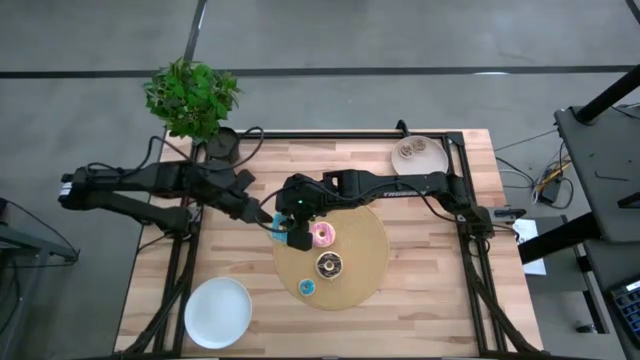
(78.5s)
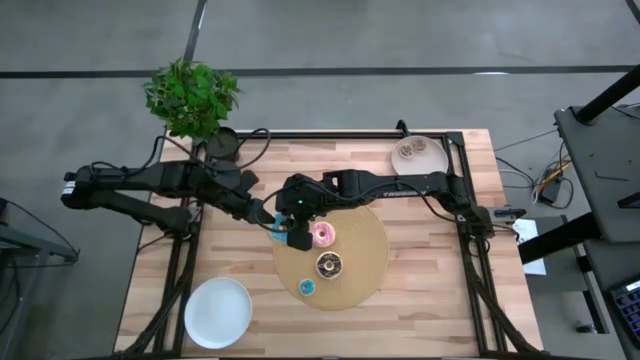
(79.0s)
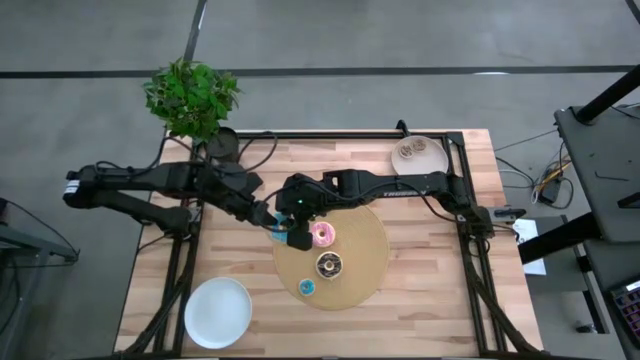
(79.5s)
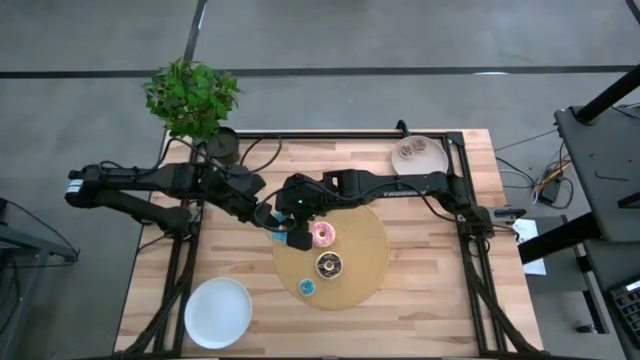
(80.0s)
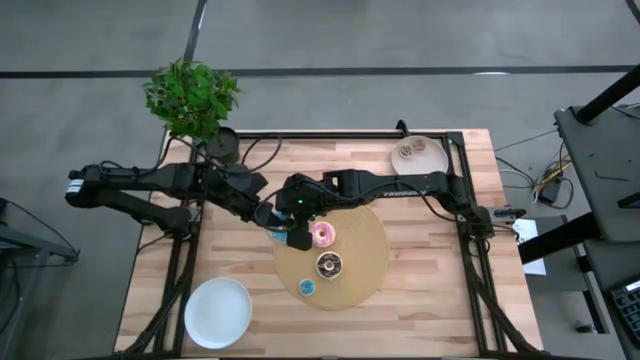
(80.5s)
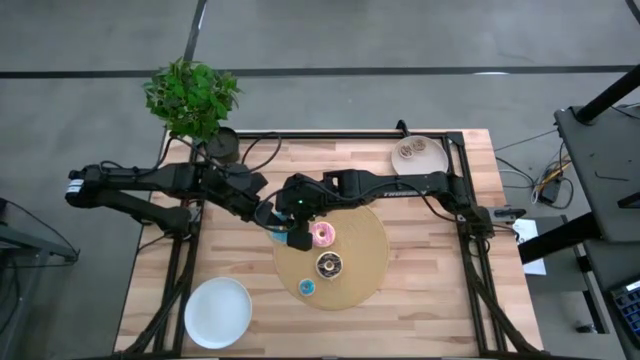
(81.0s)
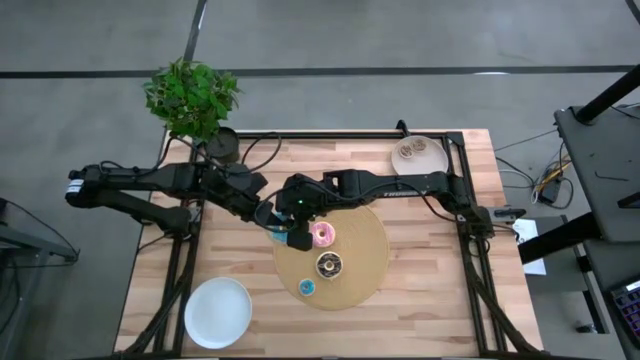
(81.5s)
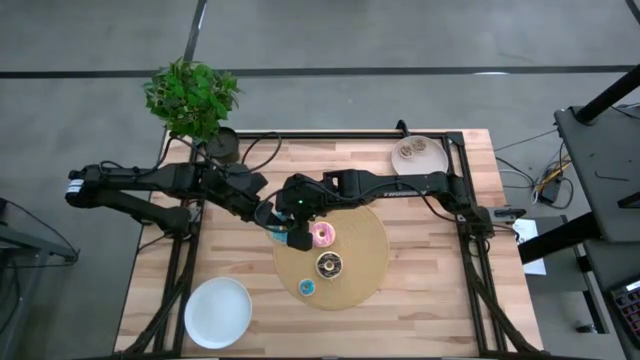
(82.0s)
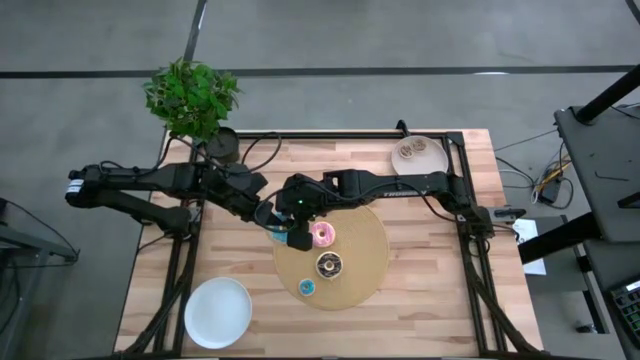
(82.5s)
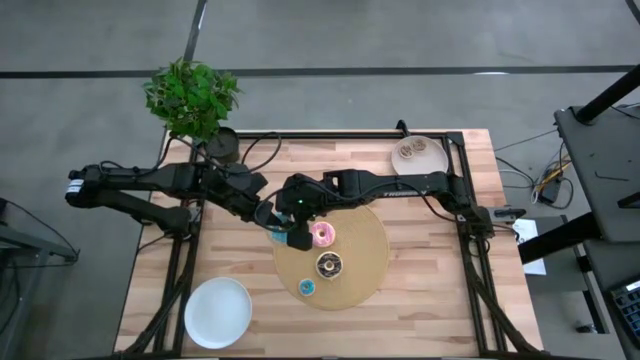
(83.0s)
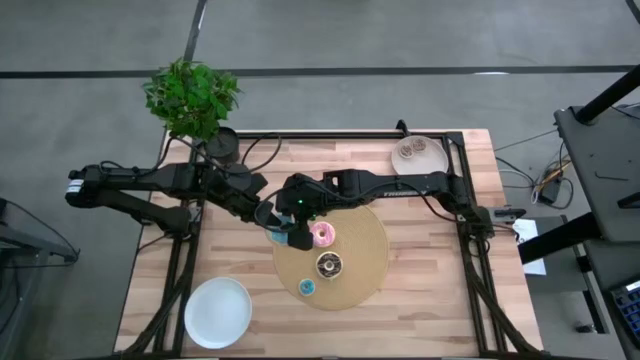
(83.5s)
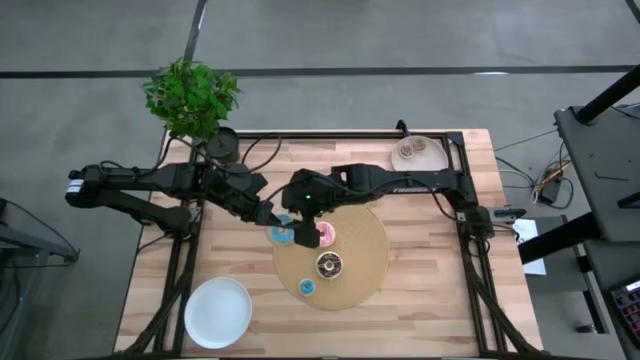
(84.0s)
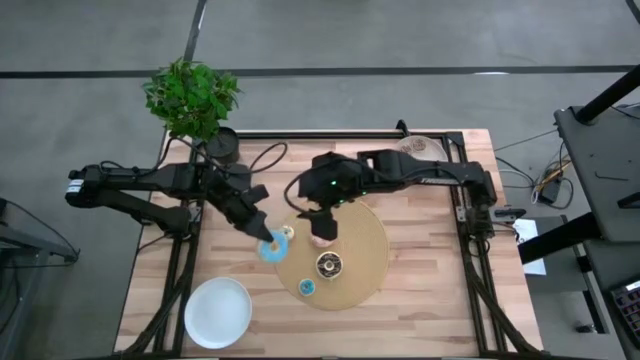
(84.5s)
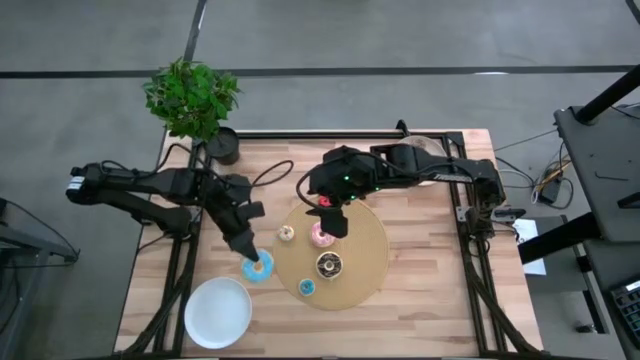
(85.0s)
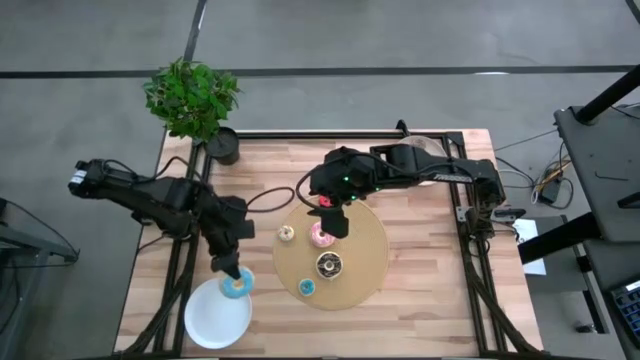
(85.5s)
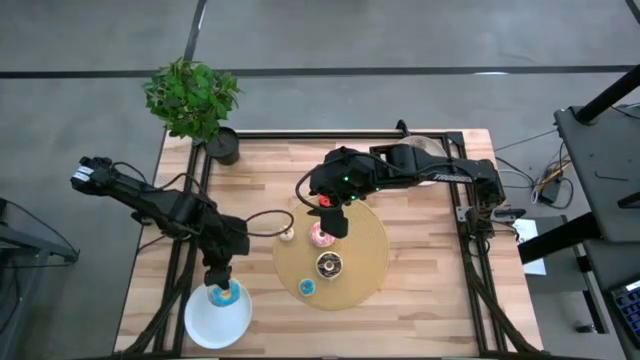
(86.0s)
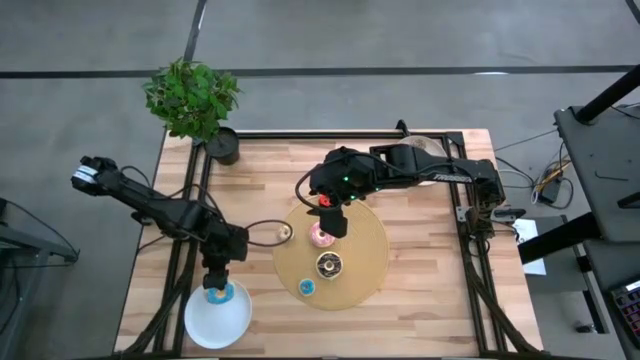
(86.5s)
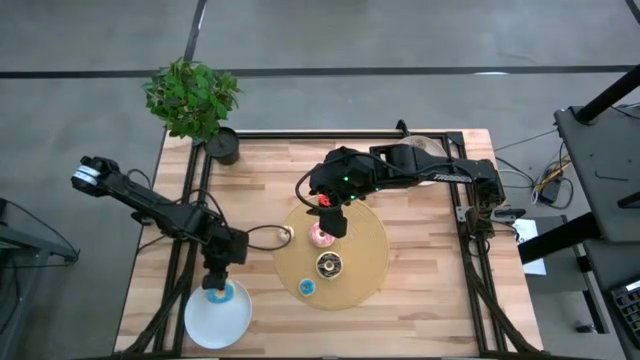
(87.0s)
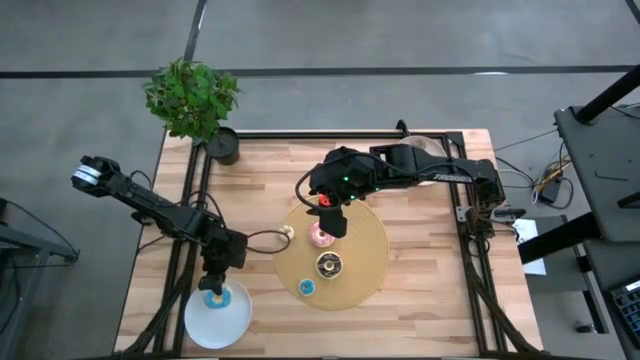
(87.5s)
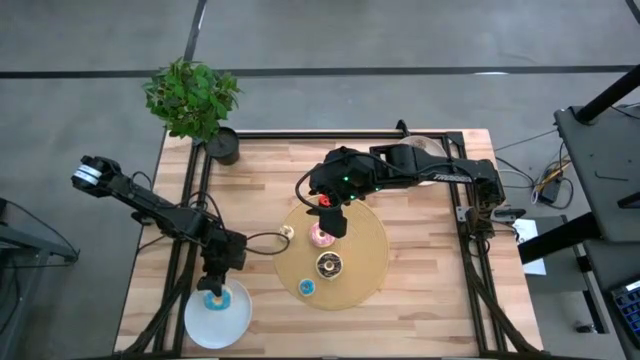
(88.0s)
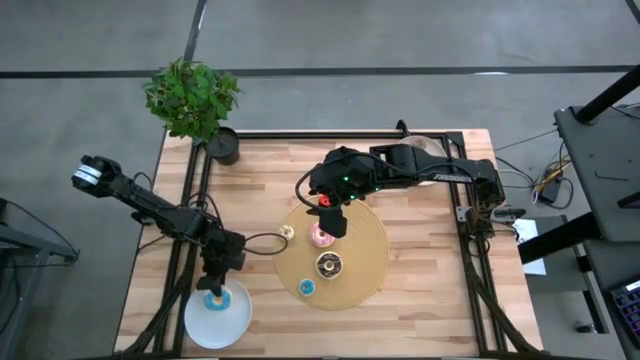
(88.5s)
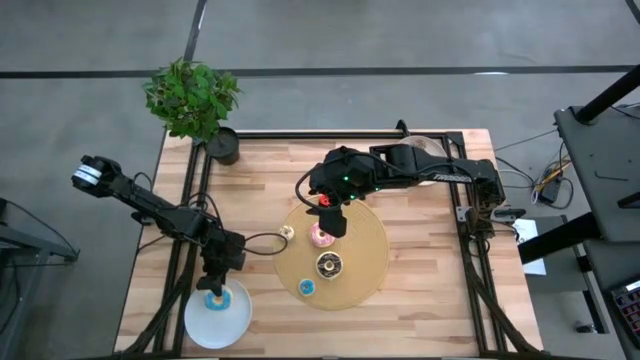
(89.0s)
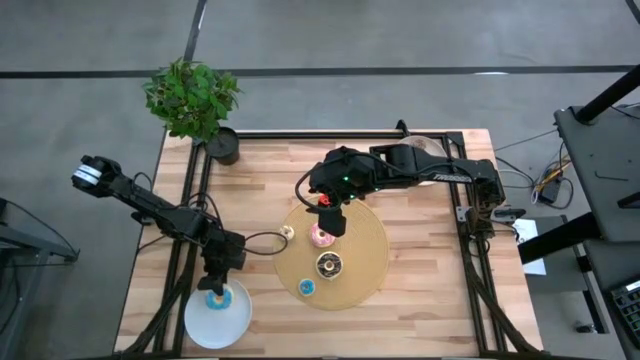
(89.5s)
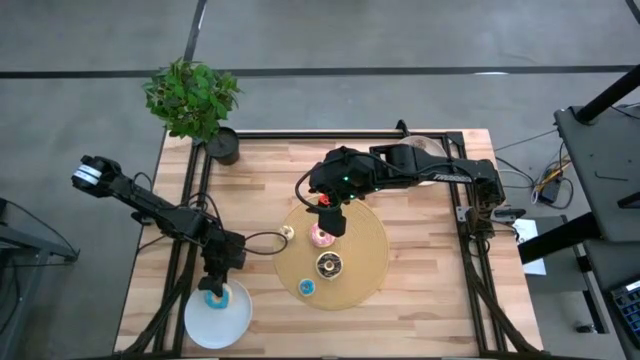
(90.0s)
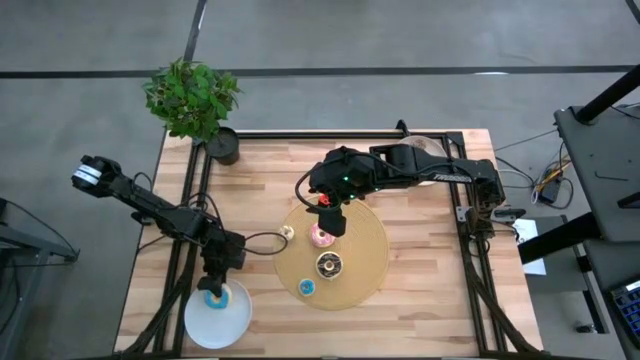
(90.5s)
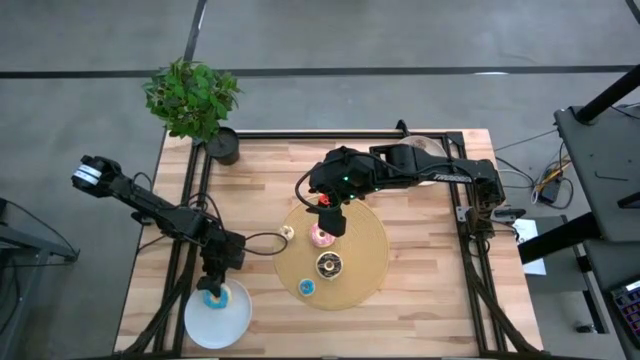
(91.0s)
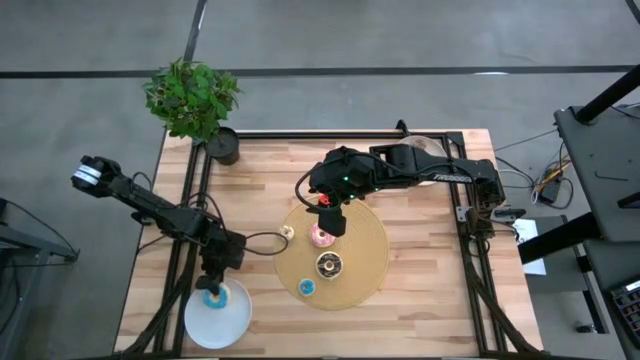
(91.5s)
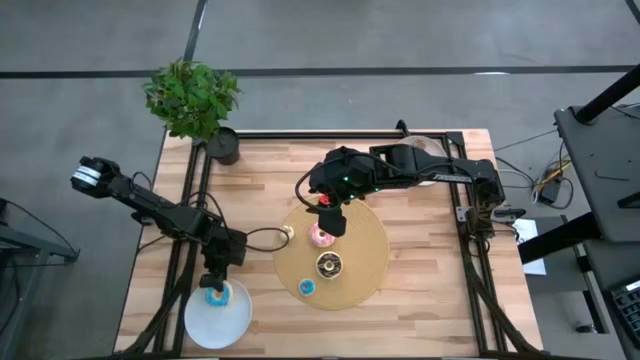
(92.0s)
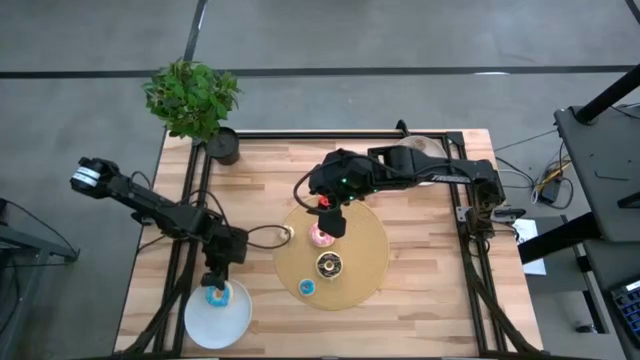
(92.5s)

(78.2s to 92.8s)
Task: Pick & Place donuts
Put the large blue donut on the white plate

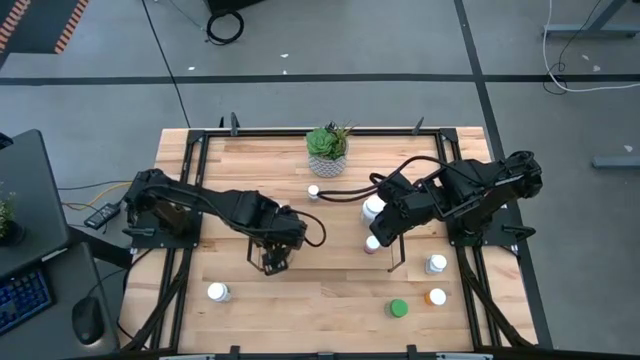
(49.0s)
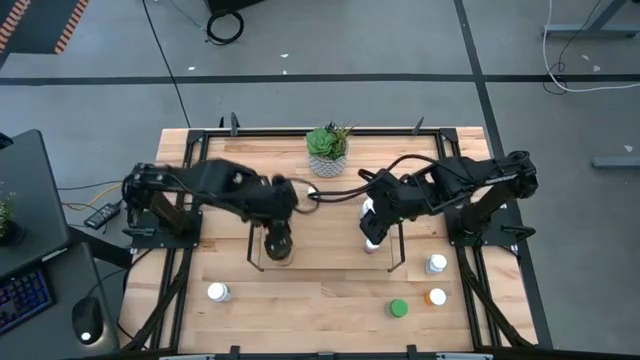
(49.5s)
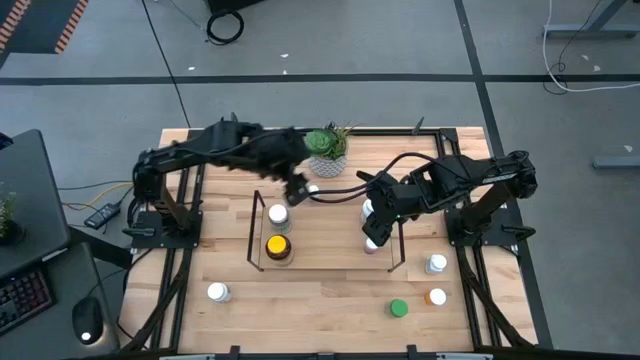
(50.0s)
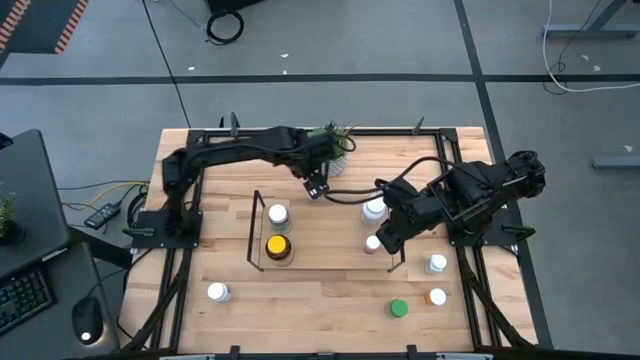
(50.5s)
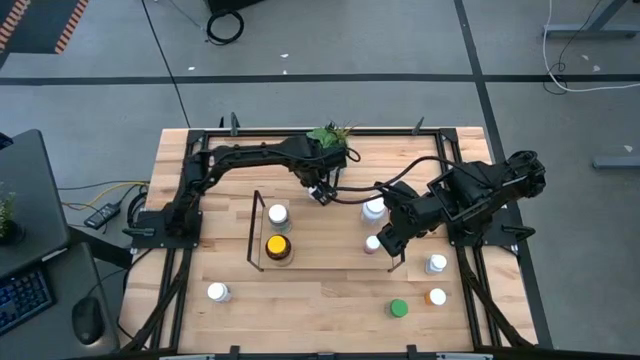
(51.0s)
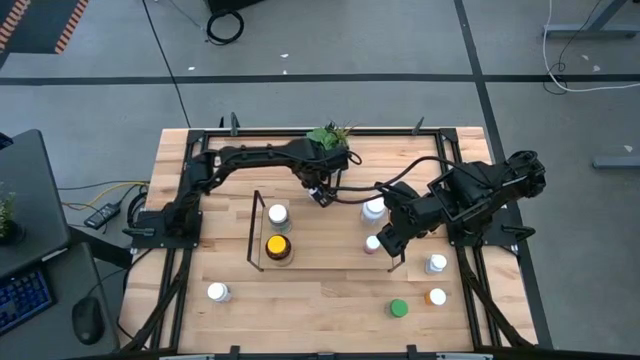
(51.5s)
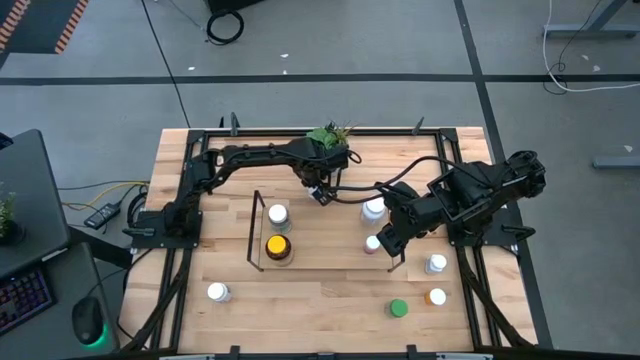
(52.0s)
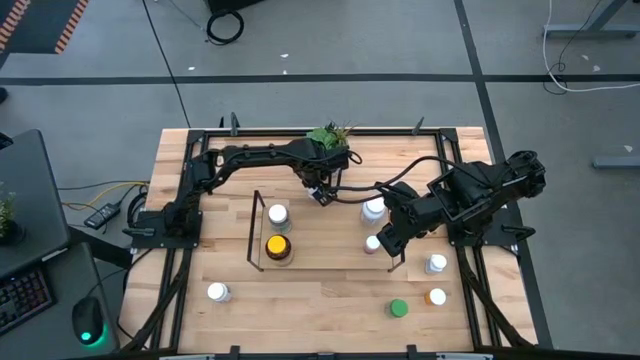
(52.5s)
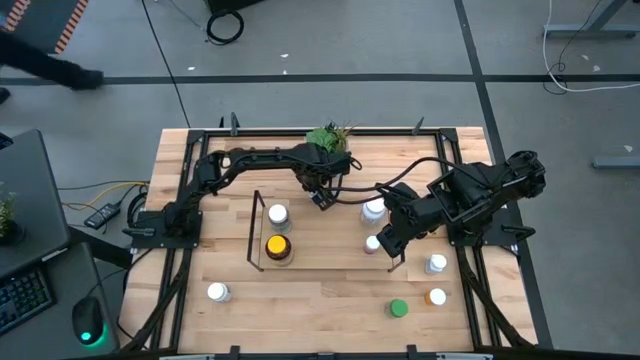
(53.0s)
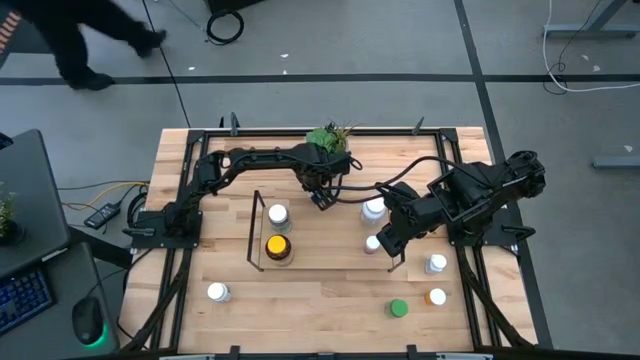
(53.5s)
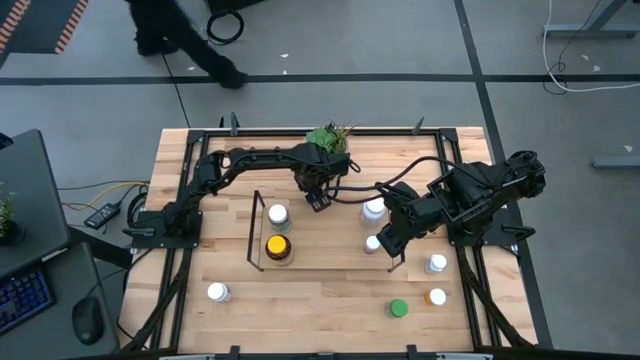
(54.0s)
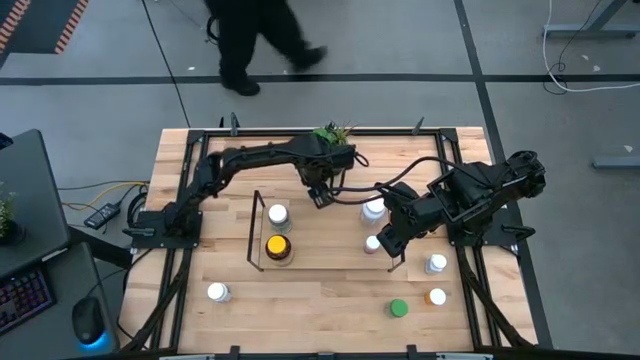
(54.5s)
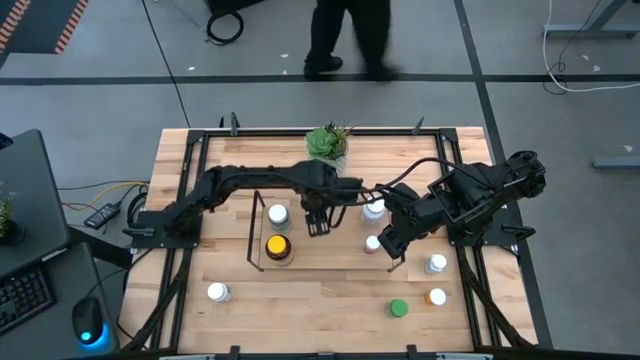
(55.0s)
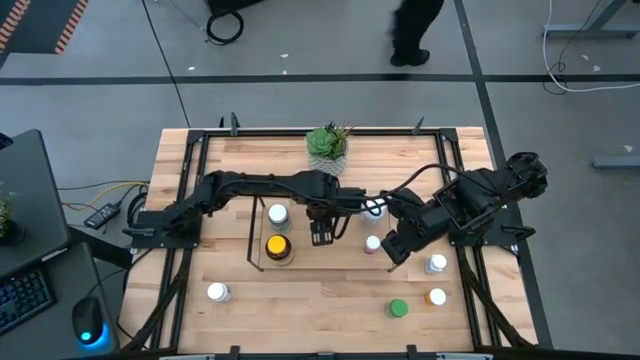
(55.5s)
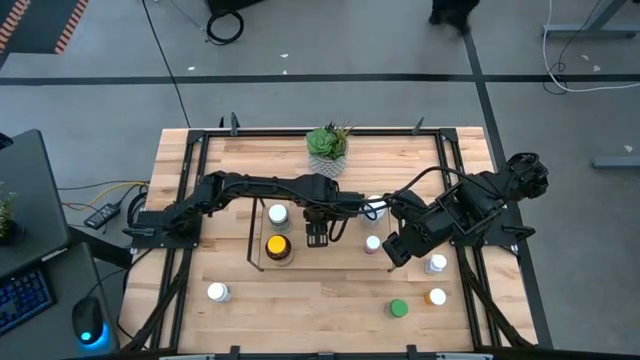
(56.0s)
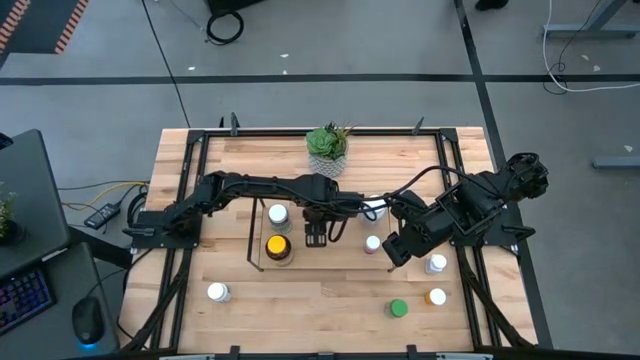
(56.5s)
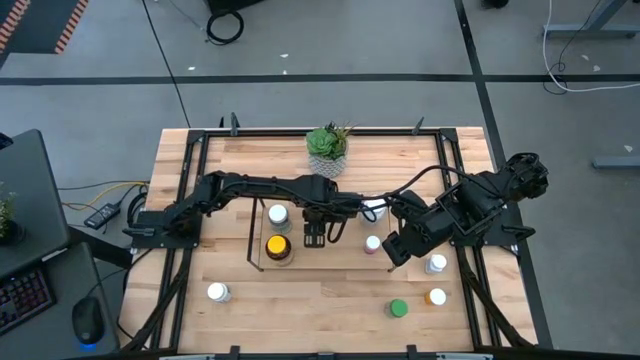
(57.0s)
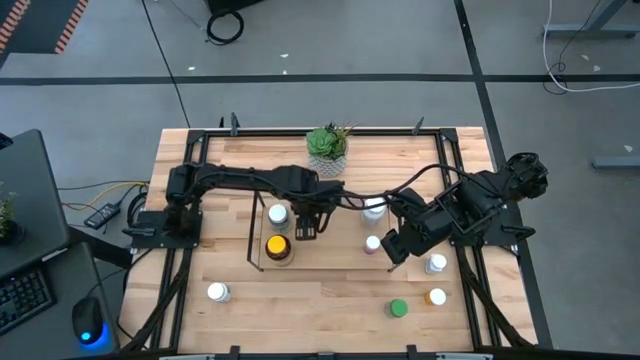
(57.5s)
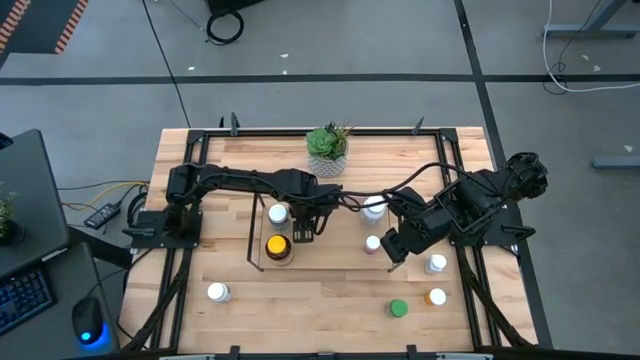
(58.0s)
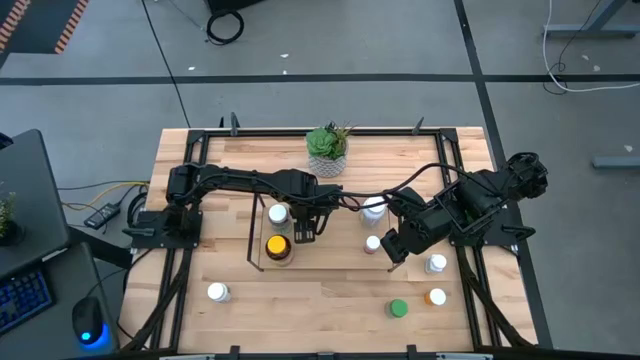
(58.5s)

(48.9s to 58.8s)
Task: Pick and place medicine bottles onto shelf by color
Put the small white medicine bottle on the shelf
